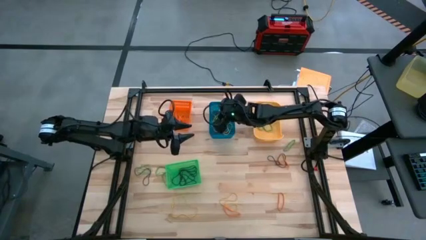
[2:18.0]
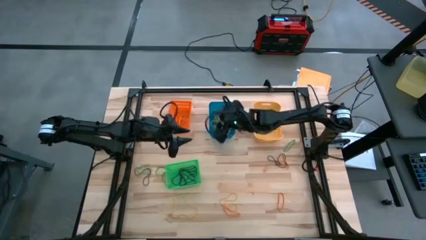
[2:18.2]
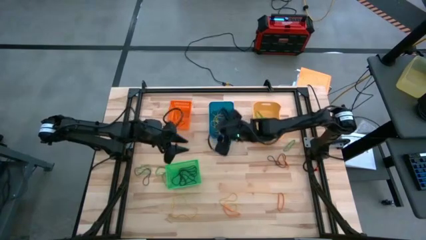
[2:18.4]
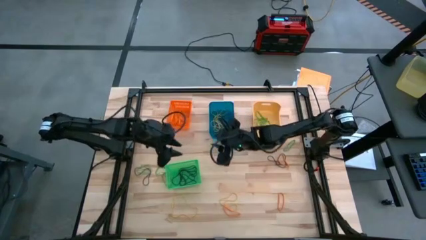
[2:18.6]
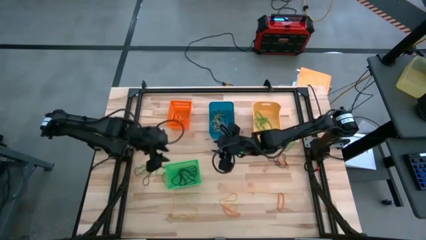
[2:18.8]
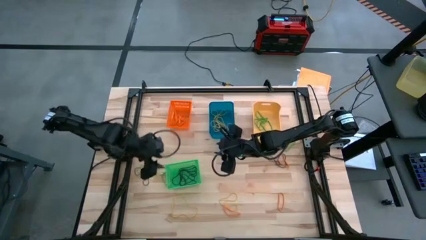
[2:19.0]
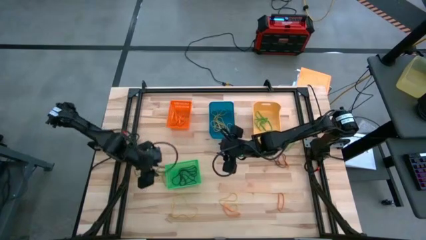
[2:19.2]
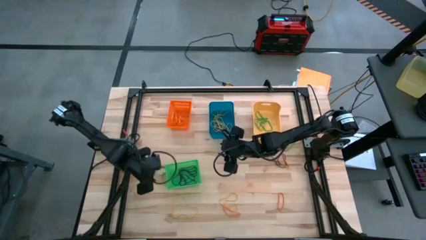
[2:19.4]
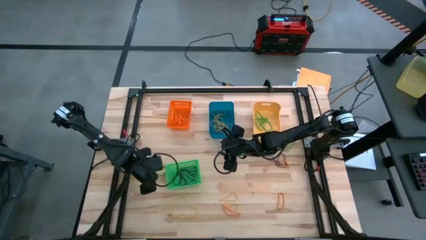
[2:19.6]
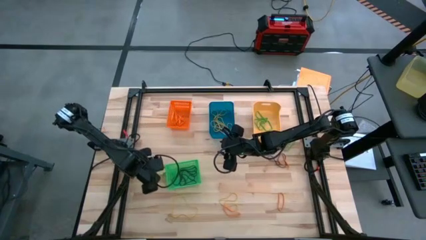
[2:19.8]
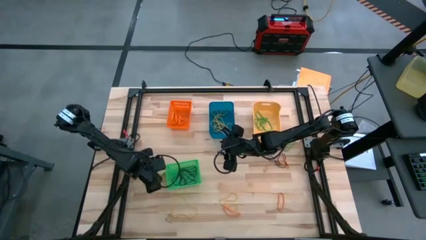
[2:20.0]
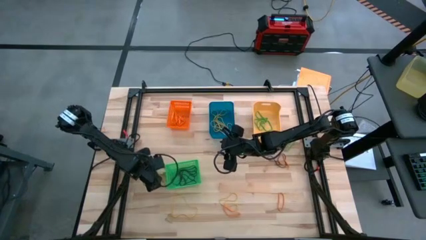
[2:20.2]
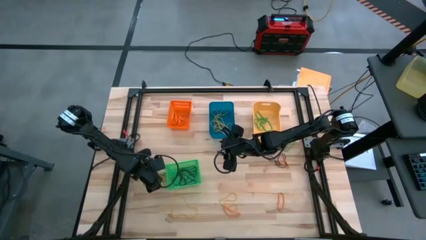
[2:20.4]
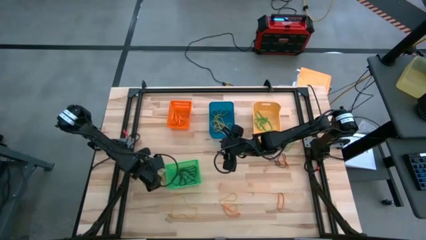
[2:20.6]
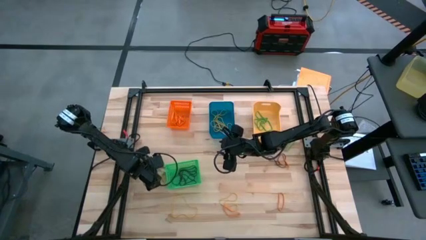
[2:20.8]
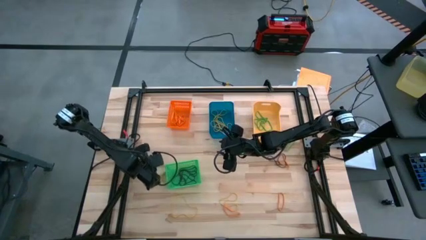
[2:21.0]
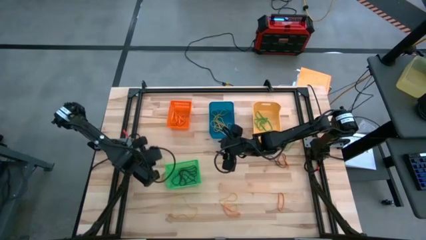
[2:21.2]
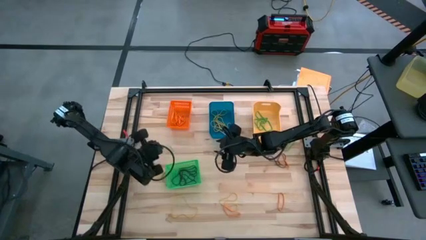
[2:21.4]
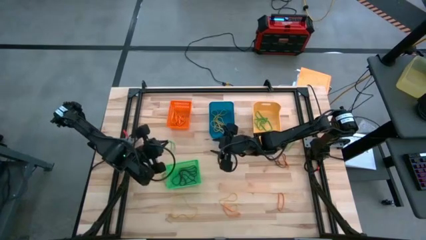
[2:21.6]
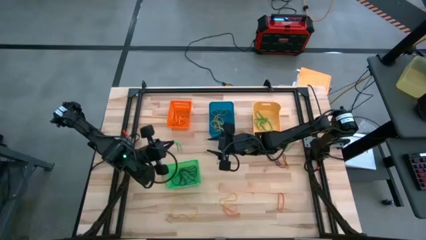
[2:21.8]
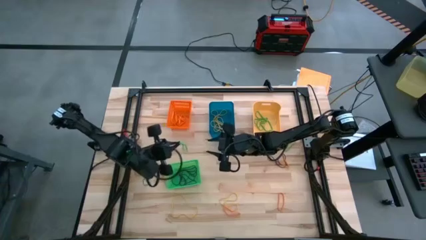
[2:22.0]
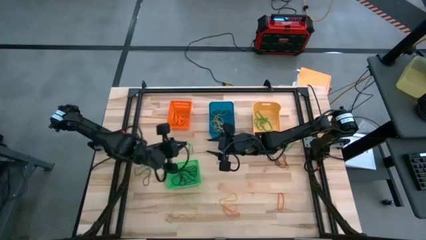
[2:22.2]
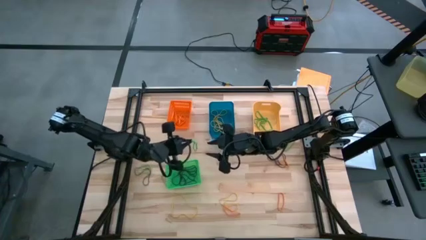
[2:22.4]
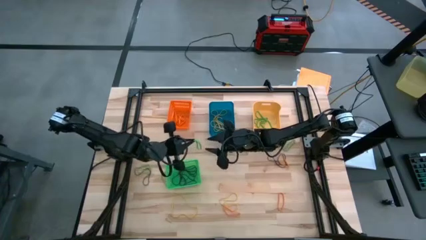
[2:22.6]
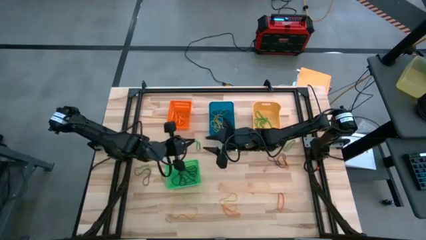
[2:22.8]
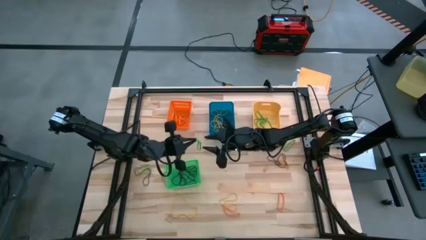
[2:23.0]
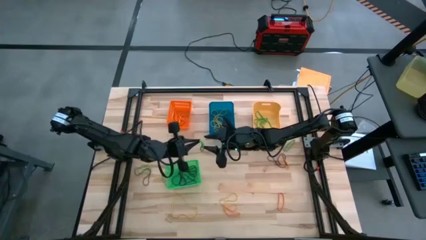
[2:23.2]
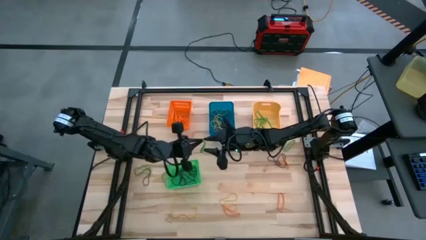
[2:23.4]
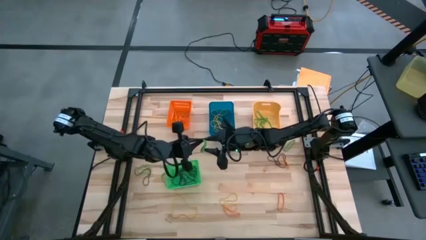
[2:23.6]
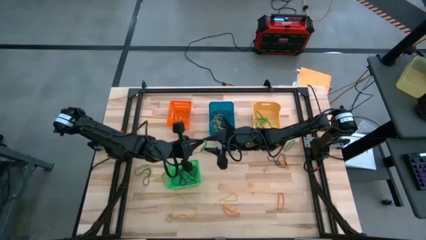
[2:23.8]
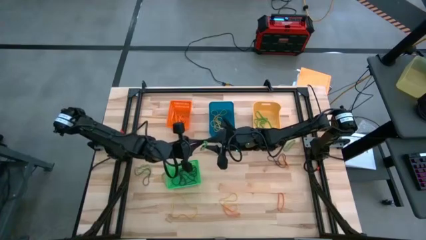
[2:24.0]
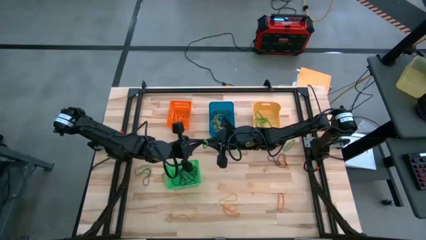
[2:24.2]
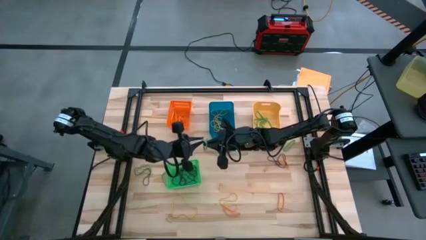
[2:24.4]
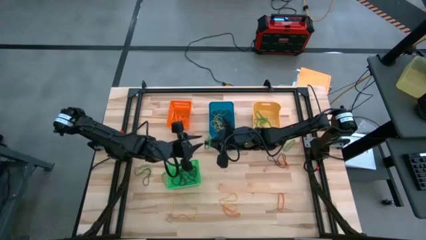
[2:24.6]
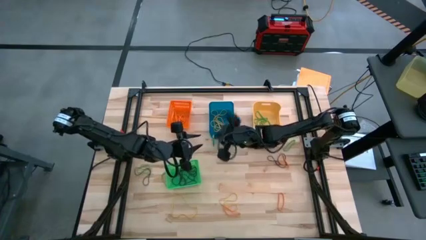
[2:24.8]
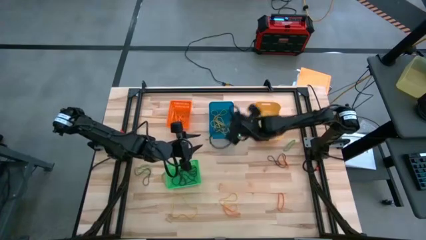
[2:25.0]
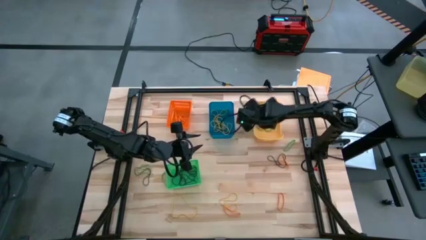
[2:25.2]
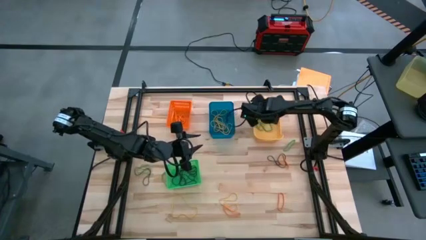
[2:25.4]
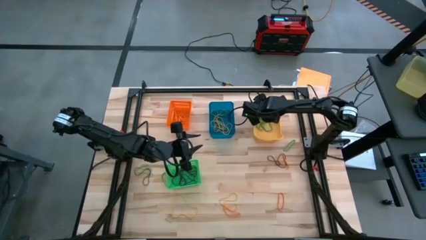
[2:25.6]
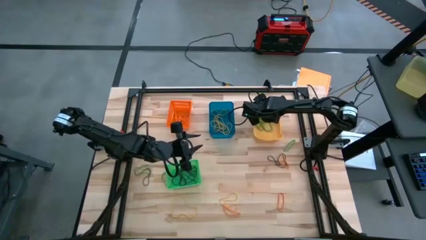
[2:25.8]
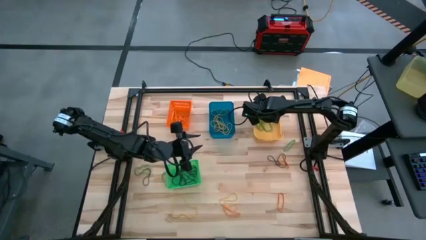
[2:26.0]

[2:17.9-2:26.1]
Task: Sort rubber bands into baskets
Put the green rubberband into the yellow bin

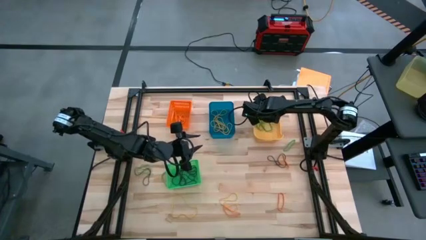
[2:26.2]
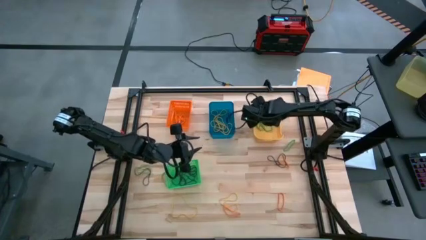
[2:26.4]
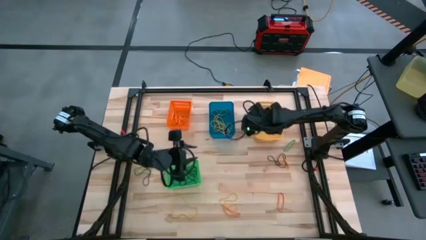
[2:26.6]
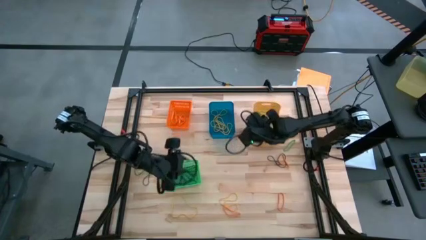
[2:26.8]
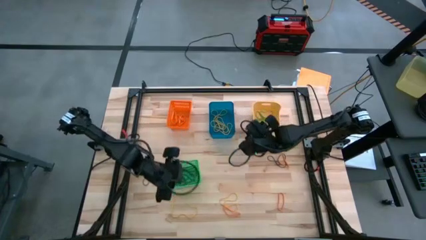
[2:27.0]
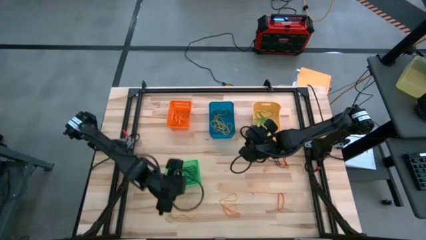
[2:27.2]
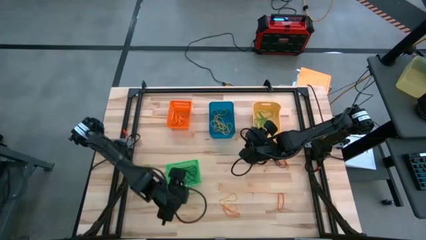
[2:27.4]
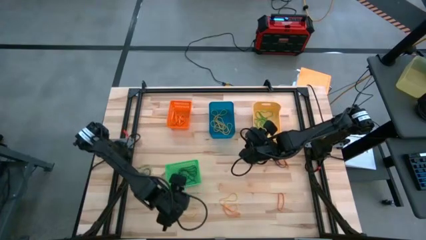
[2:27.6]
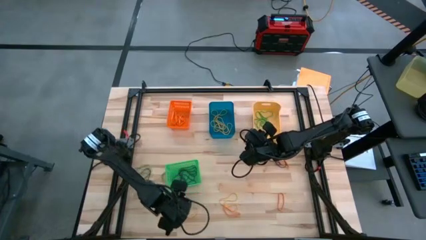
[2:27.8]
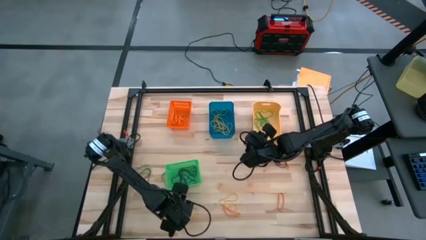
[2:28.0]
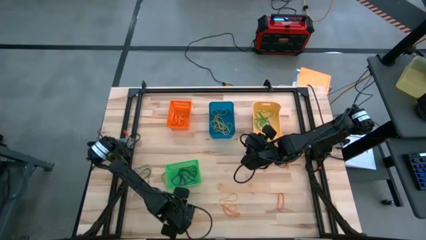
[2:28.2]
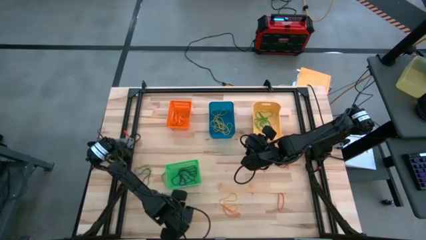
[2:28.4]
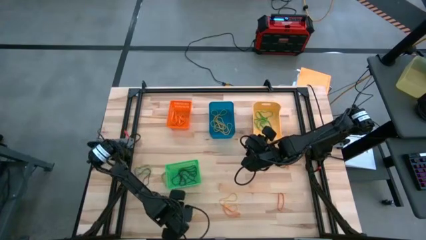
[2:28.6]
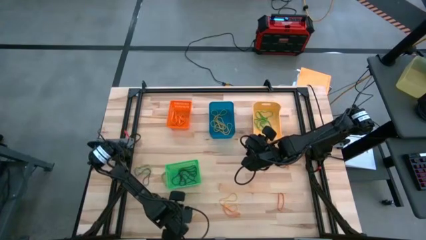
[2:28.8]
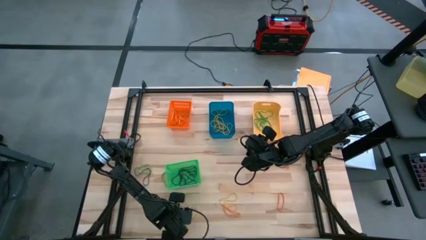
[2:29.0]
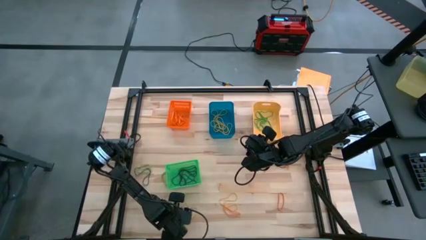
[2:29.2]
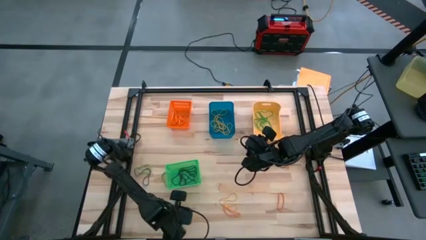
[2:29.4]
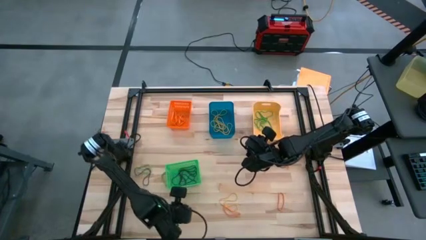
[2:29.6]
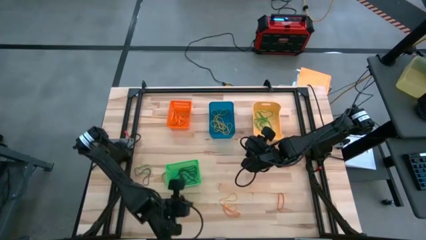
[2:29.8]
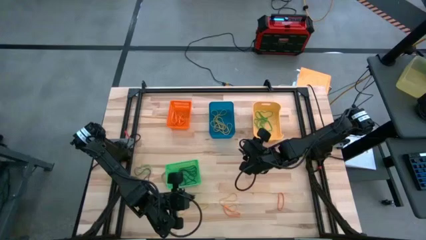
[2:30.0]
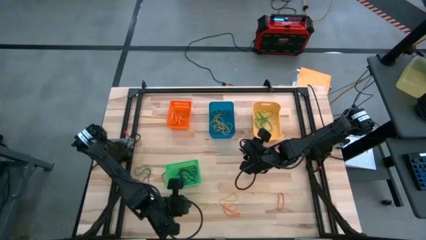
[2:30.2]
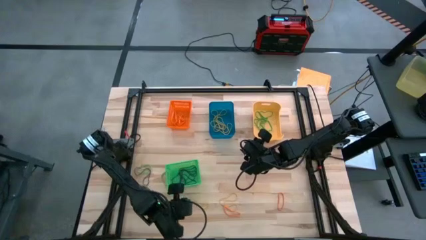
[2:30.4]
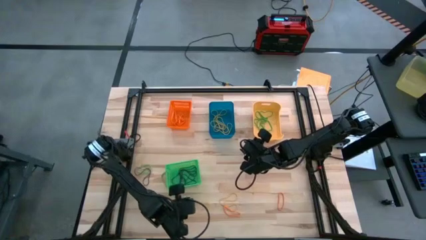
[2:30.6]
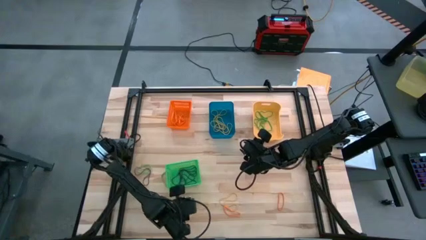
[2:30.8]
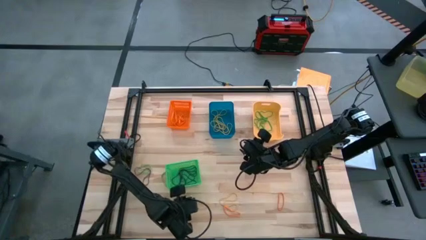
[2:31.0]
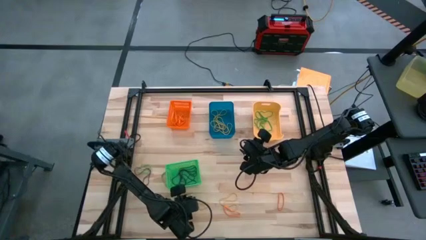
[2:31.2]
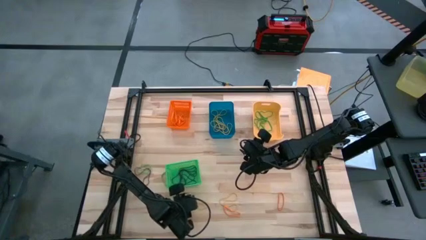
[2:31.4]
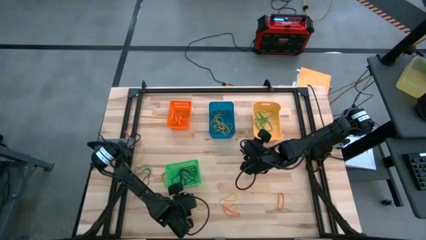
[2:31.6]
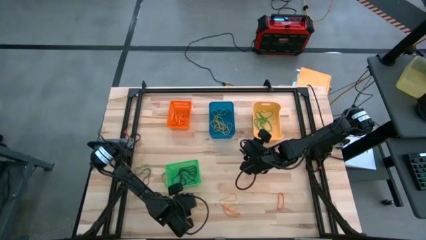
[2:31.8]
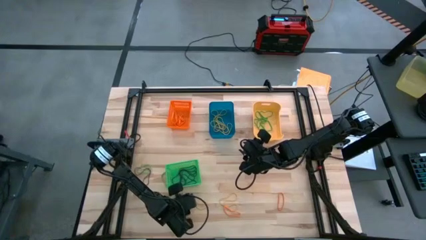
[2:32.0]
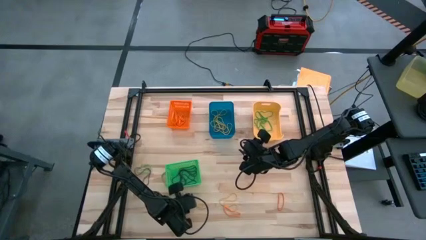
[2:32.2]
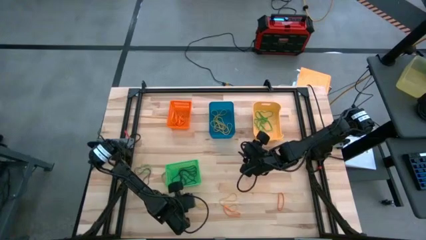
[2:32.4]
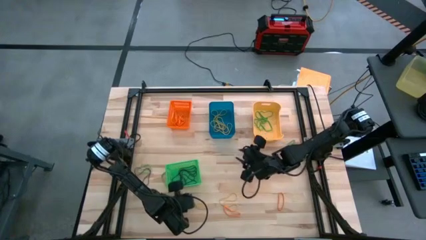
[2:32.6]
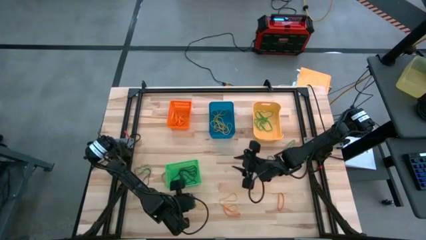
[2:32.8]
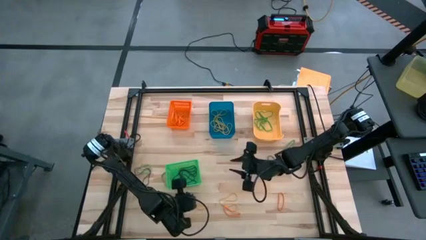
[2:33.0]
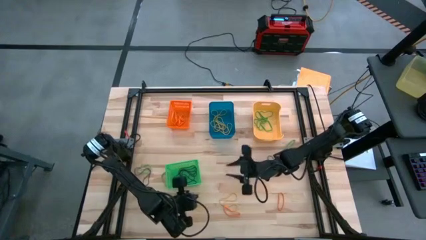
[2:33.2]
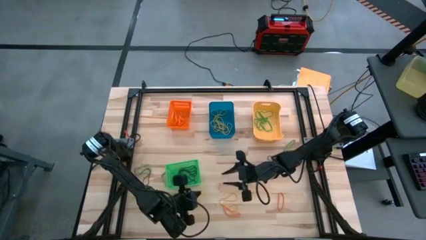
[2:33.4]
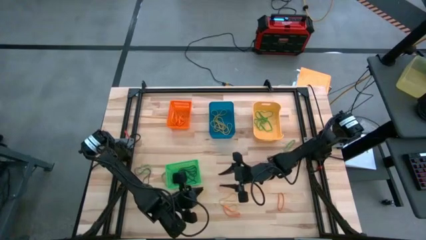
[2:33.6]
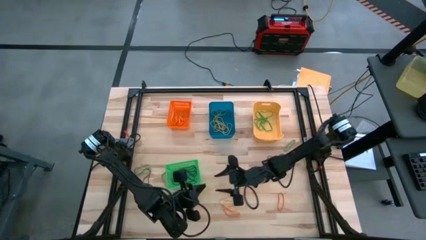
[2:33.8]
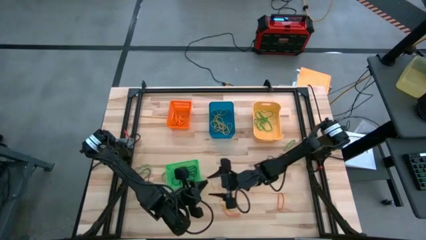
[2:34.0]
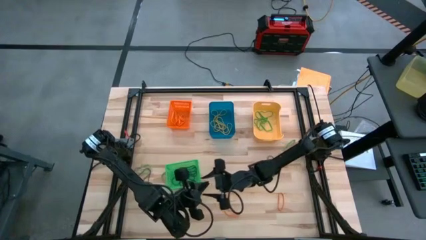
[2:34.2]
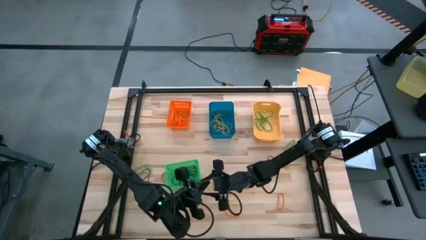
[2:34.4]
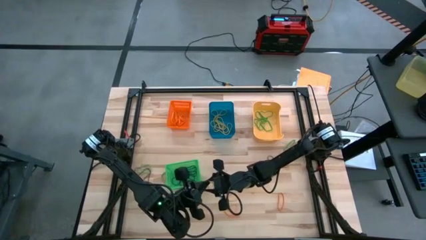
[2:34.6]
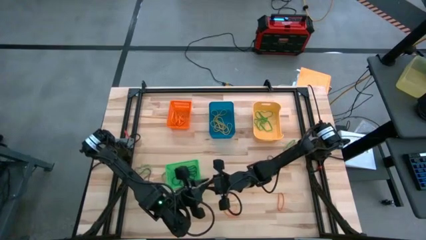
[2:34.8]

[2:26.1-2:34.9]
Put the yellow rubberband into the blue bin
